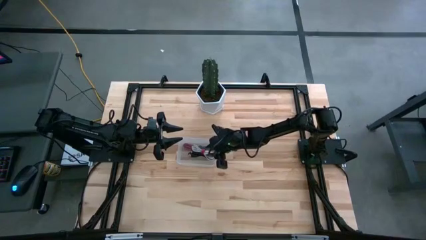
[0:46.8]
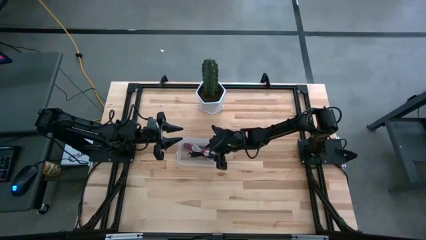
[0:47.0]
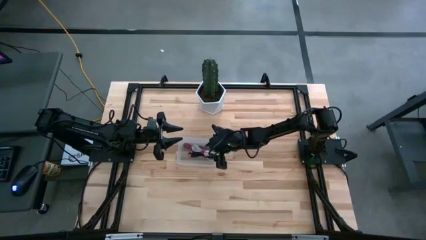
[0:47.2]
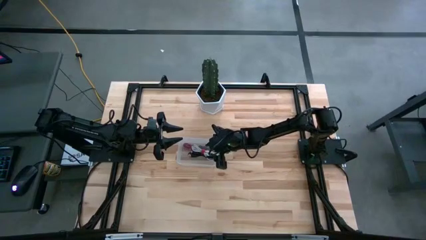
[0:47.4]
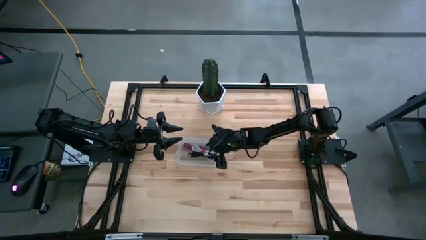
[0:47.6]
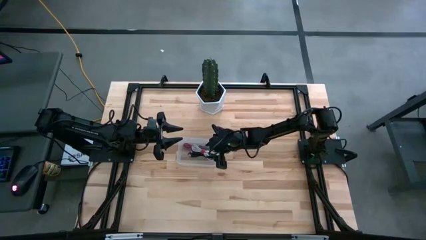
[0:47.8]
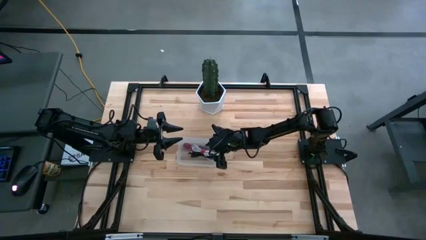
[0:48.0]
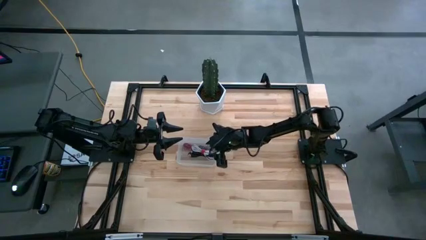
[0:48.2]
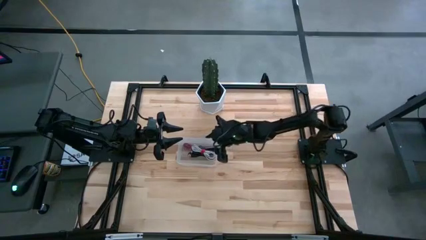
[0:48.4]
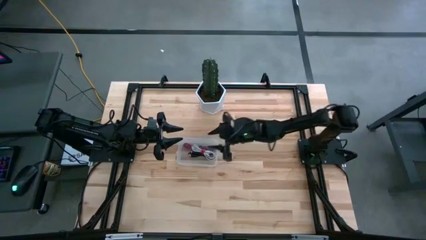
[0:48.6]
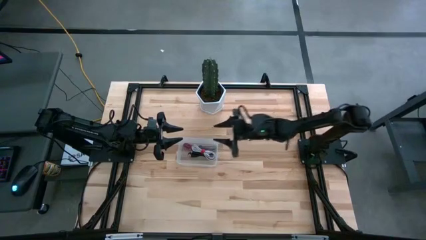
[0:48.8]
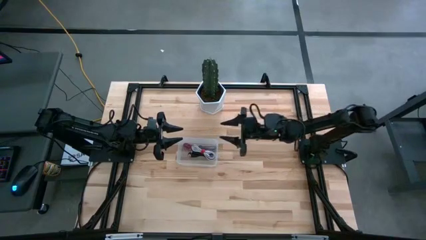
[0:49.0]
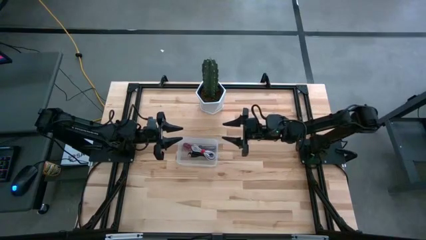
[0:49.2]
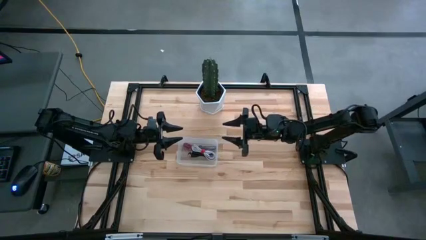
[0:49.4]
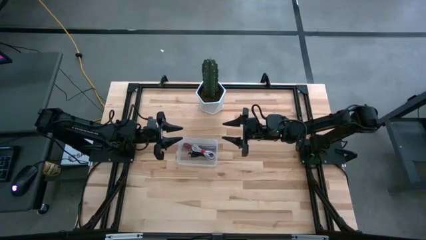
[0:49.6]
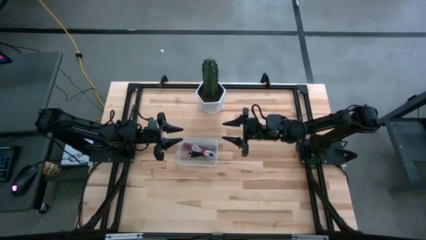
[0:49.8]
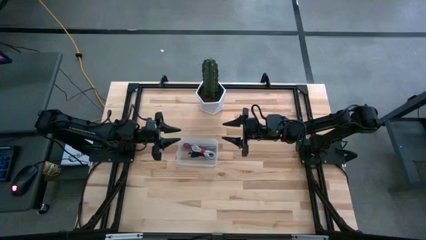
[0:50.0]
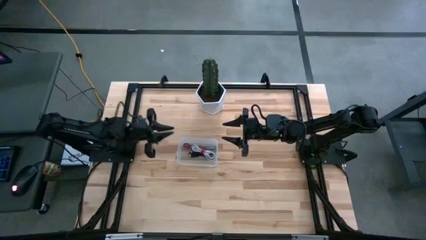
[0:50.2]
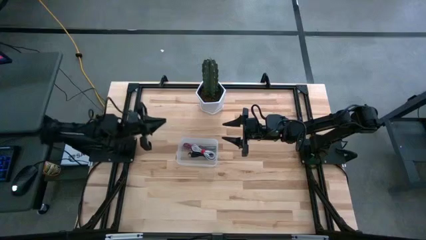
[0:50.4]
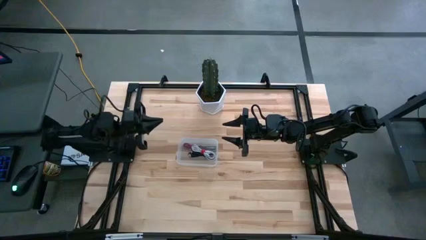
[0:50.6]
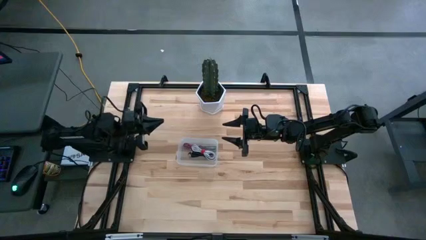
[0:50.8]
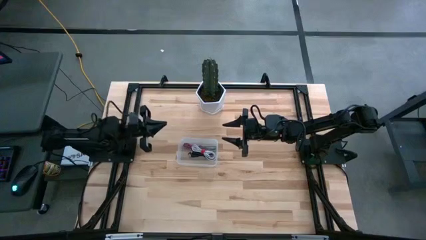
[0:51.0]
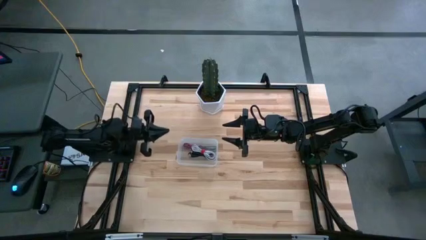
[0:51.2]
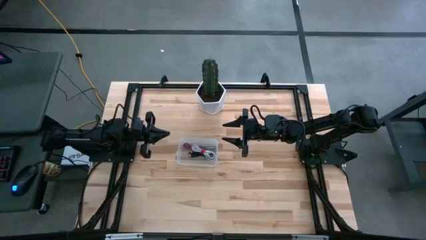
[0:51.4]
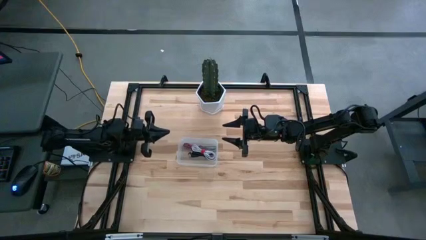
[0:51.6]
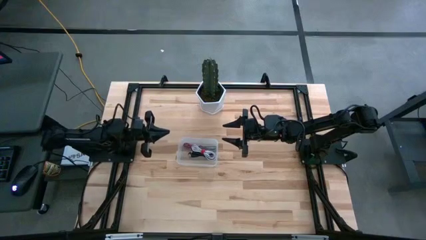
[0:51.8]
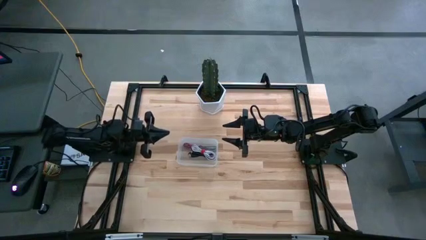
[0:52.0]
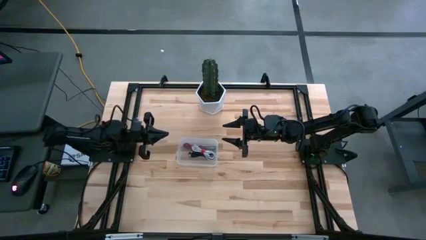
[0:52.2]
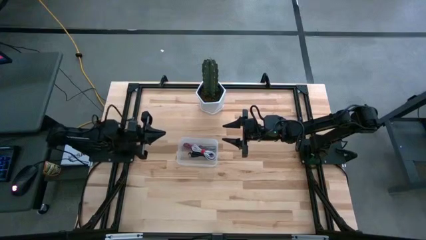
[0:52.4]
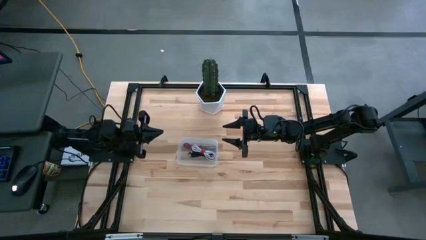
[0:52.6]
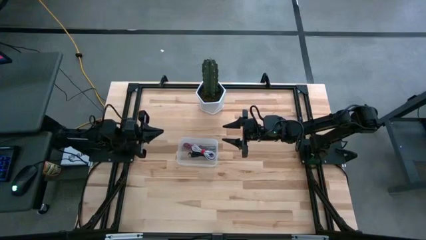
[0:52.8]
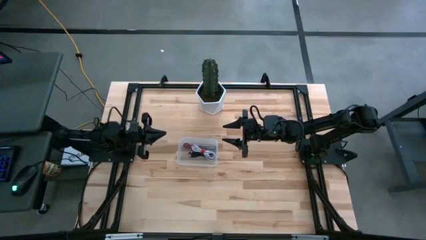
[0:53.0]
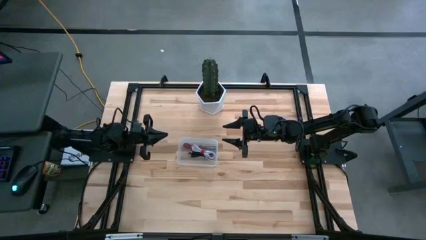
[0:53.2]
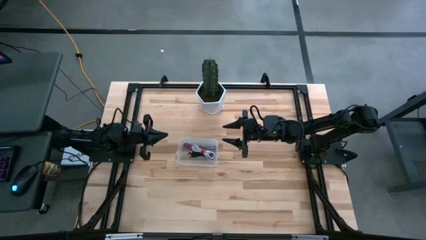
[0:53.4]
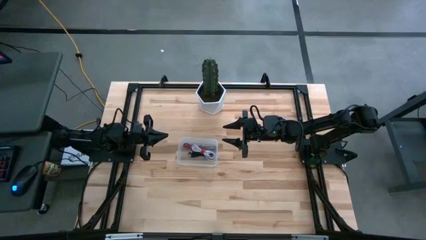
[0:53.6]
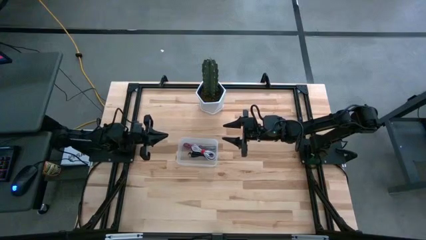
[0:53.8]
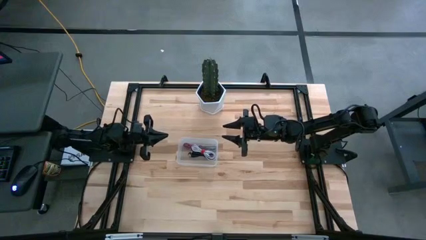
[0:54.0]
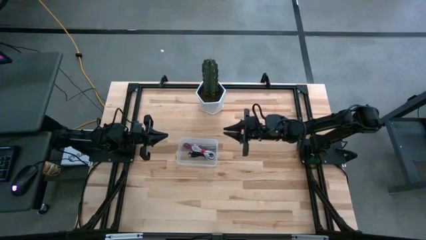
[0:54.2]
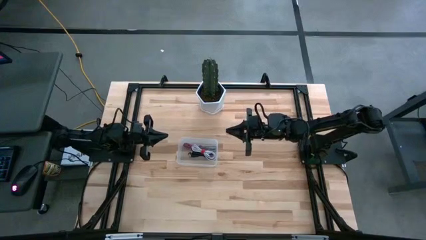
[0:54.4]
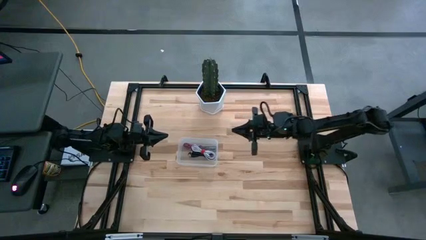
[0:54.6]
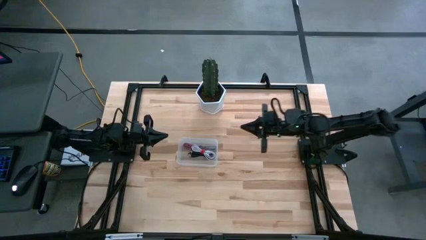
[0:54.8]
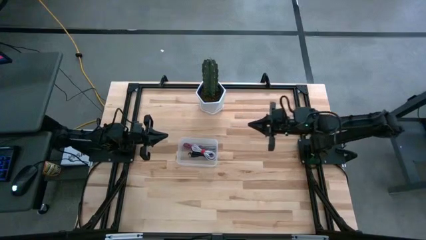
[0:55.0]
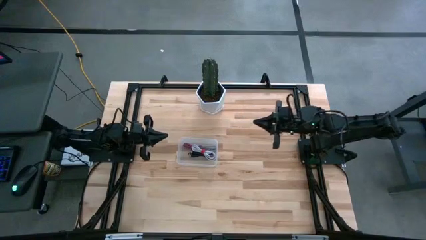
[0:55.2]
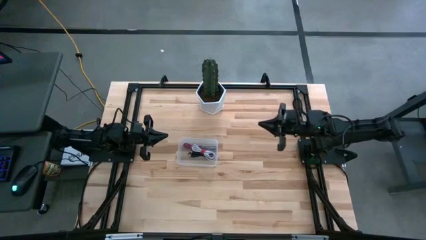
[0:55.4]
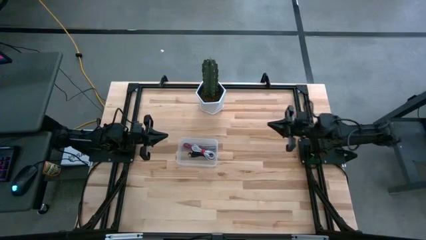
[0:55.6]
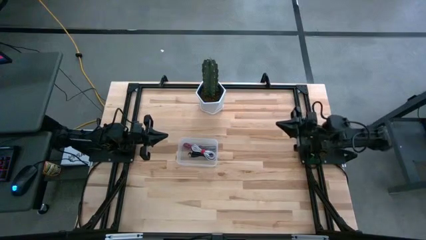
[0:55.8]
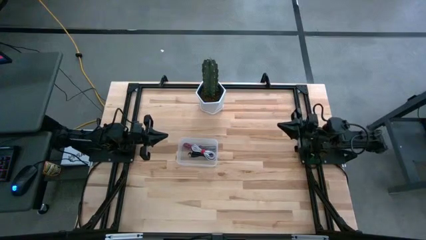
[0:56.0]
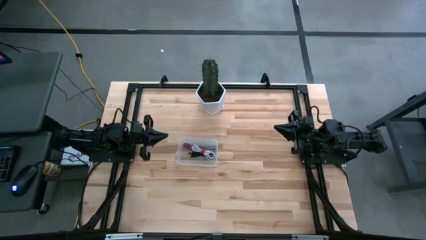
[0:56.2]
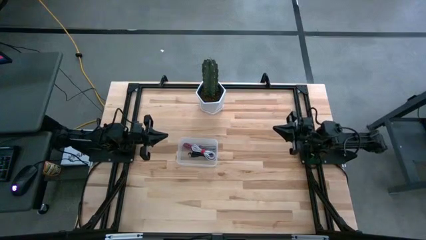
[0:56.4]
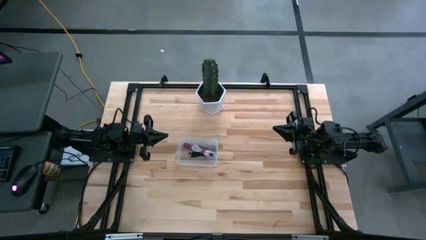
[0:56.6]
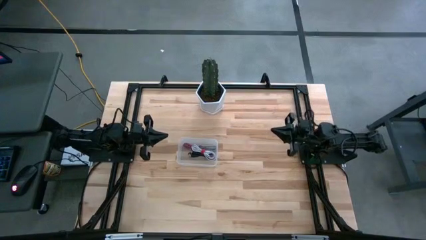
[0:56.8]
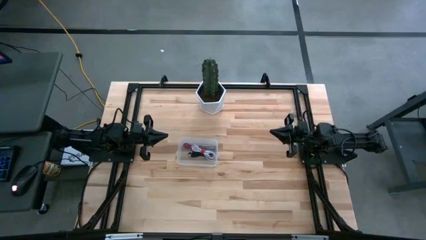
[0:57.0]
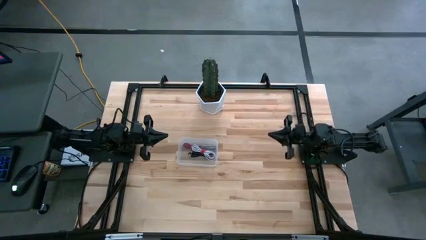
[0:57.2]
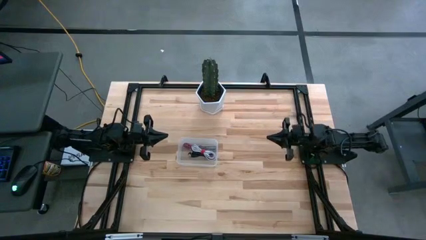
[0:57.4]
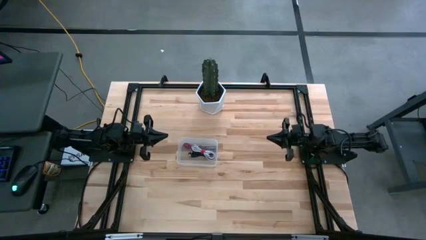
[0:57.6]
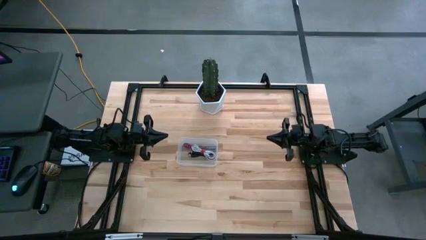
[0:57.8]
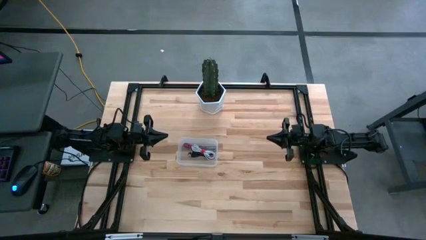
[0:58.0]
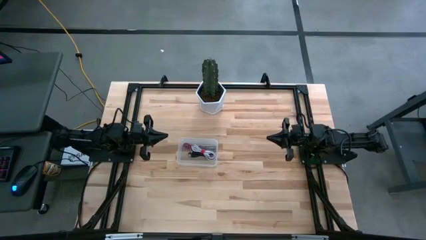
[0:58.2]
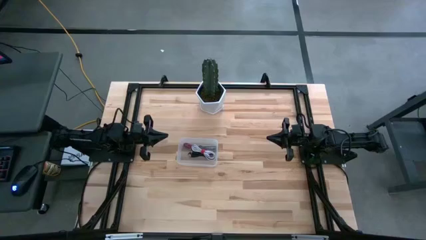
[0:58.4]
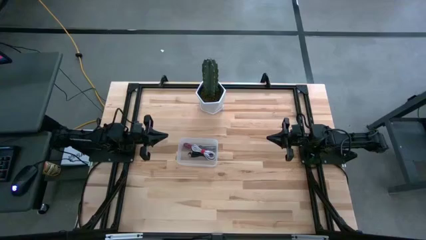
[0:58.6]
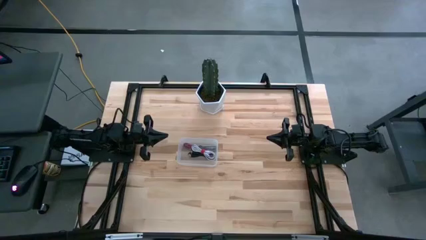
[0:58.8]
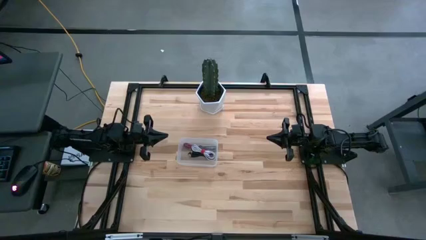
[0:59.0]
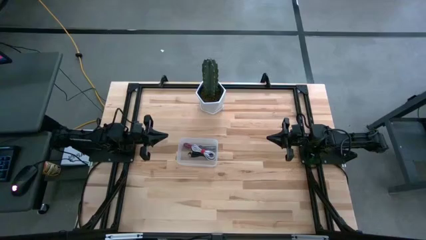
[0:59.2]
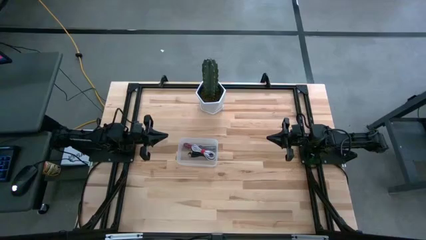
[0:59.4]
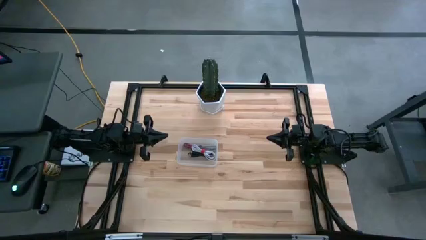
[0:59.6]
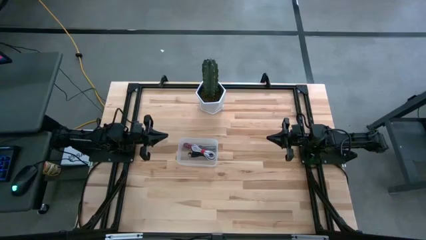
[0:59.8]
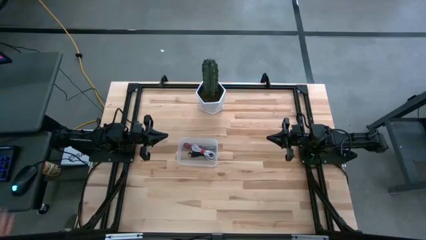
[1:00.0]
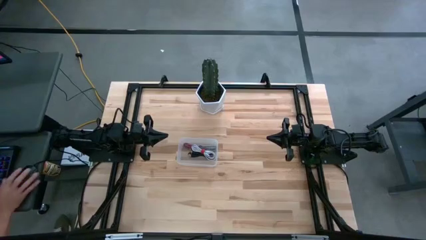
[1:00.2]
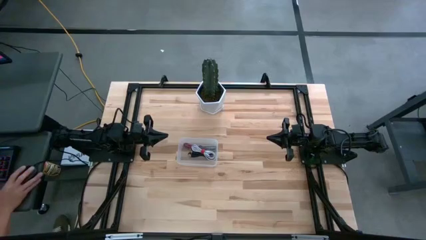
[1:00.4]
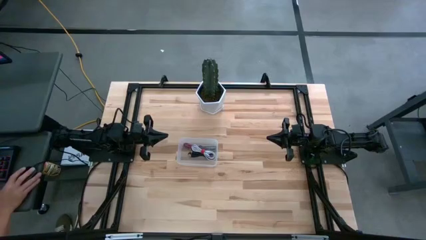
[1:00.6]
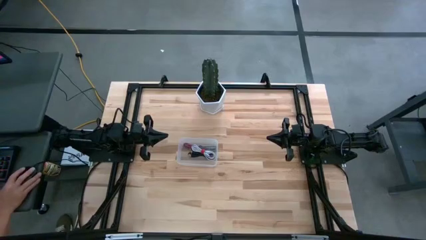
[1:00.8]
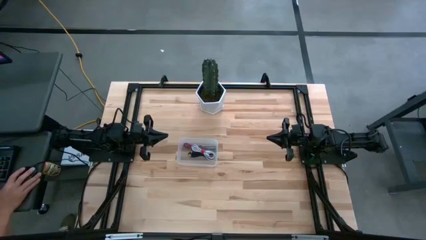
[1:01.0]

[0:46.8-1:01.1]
Task: Pick and place USB-C Cables
Return to Home Position

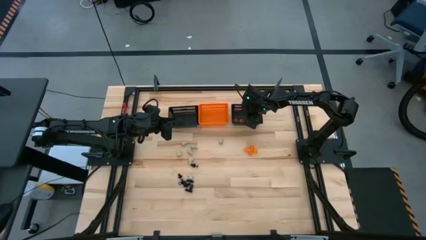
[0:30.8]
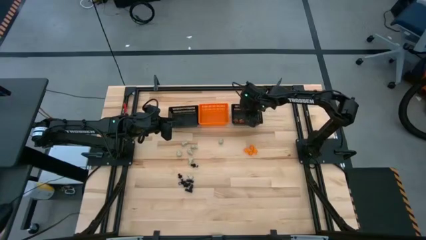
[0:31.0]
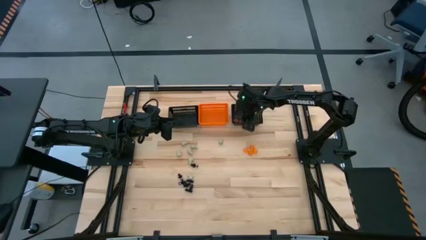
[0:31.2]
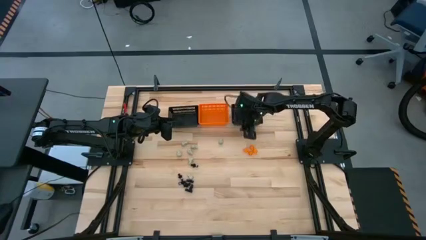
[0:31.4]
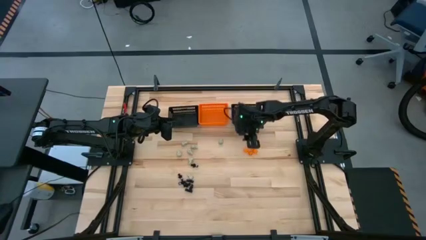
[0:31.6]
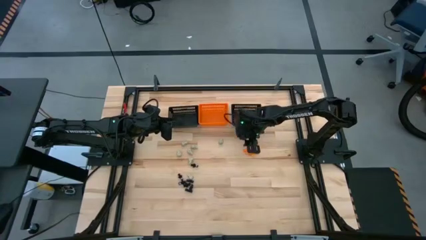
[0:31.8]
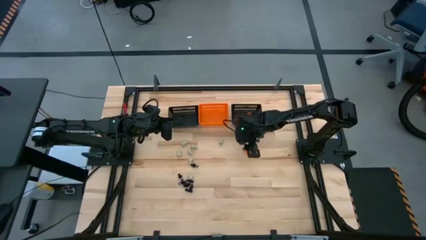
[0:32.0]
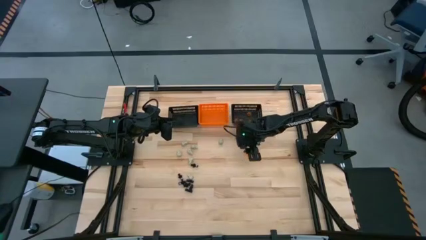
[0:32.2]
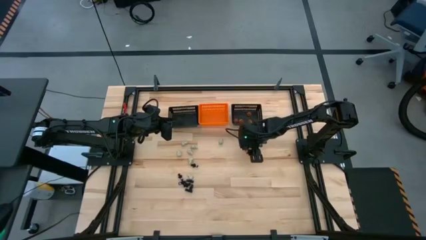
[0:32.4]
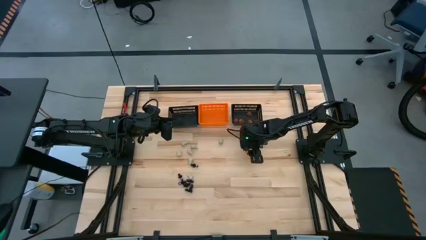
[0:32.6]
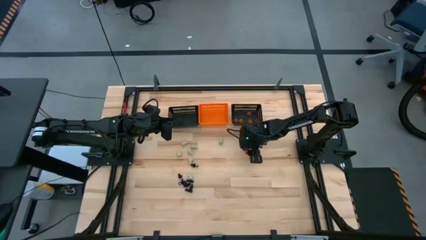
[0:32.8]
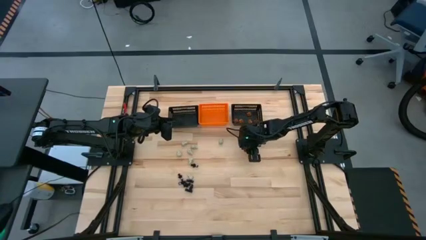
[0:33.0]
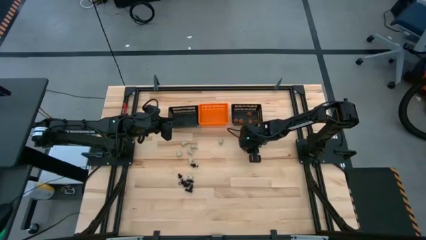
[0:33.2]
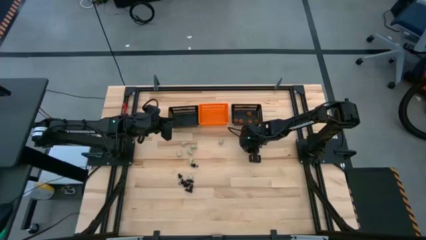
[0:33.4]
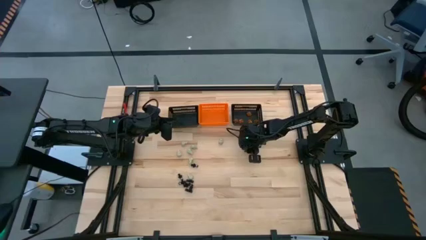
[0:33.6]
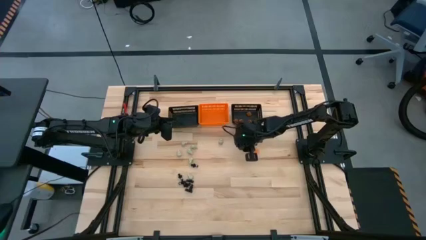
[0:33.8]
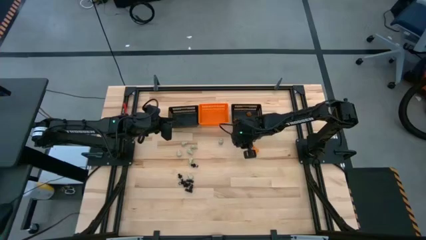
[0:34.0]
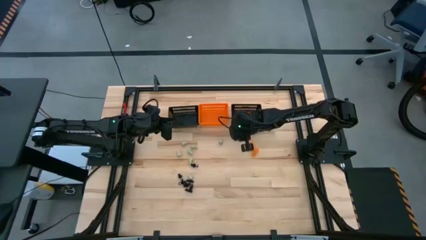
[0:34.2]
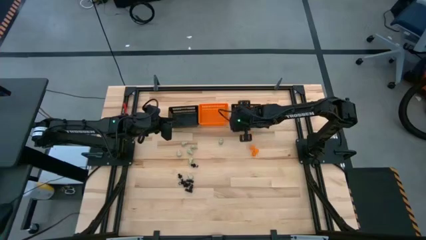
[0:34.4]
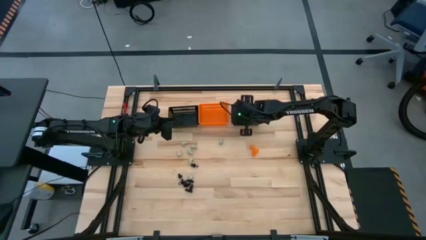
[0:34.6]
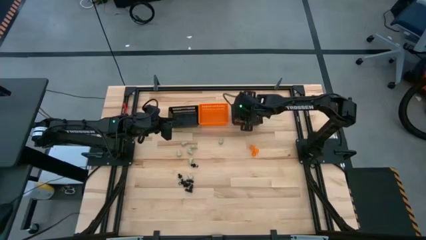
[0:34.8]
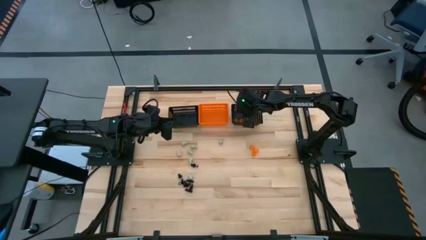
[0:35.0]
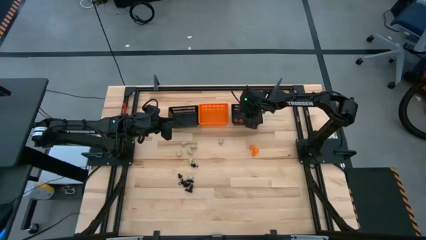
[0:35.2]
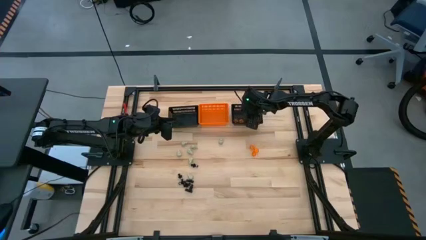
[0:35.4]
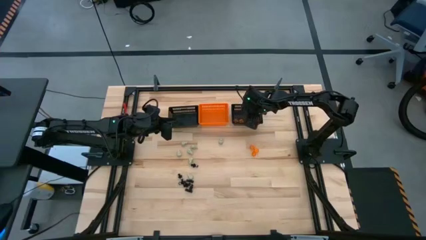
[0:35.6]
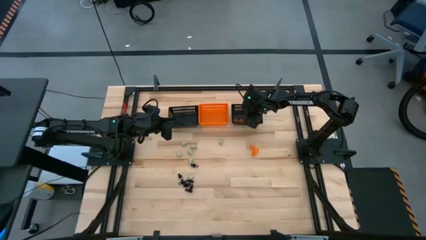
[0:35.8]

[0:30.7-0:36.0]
Task: Sort Halloween decoration
Put the orange pumpkin toy into the right black bin
